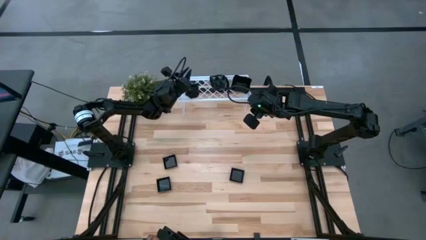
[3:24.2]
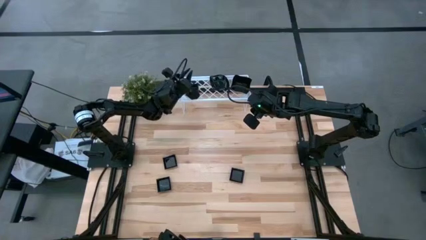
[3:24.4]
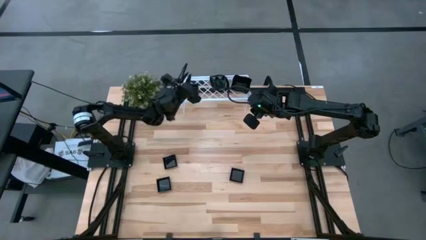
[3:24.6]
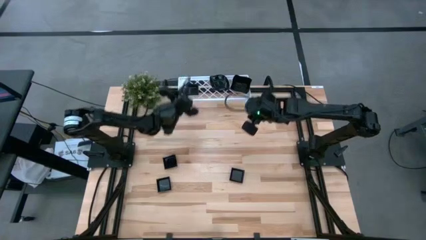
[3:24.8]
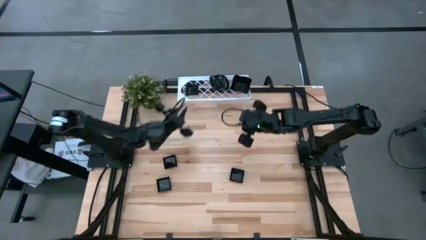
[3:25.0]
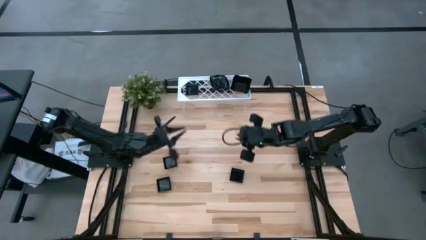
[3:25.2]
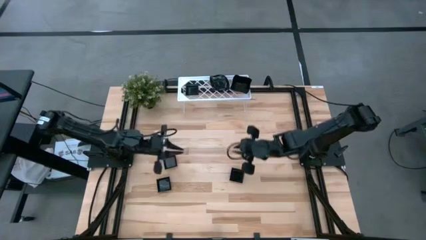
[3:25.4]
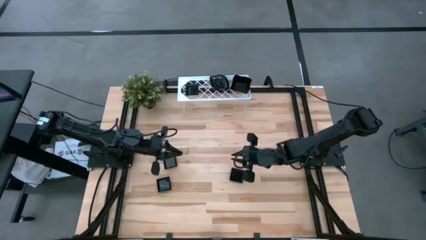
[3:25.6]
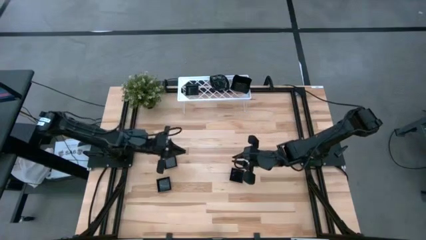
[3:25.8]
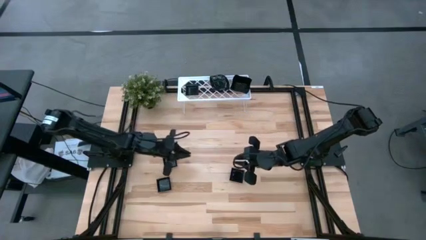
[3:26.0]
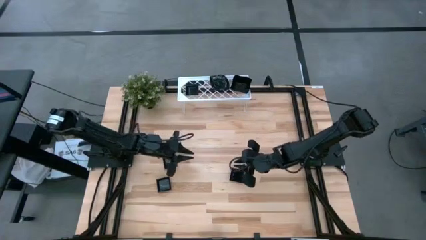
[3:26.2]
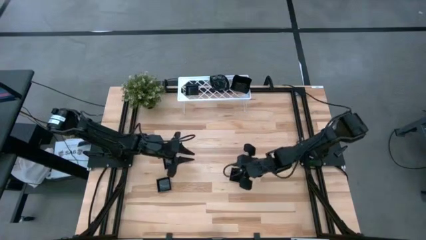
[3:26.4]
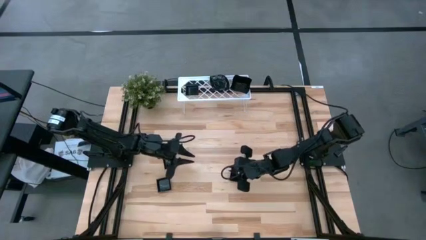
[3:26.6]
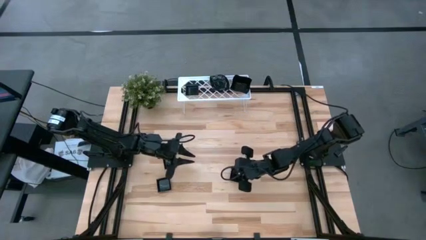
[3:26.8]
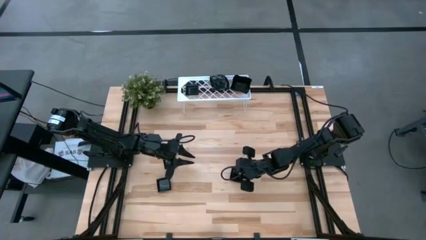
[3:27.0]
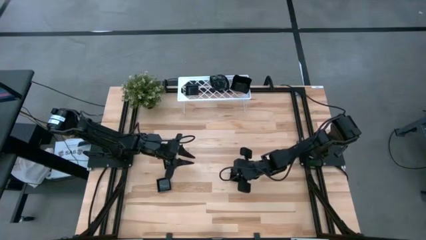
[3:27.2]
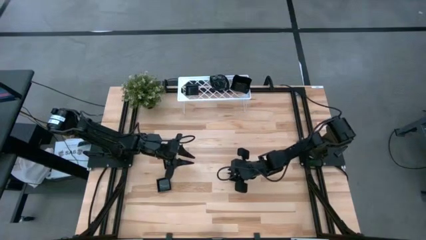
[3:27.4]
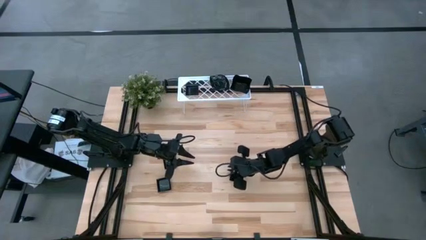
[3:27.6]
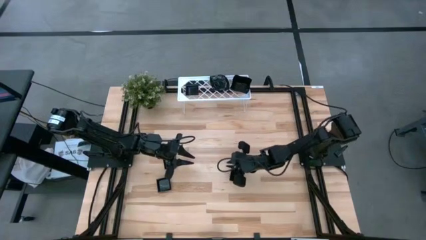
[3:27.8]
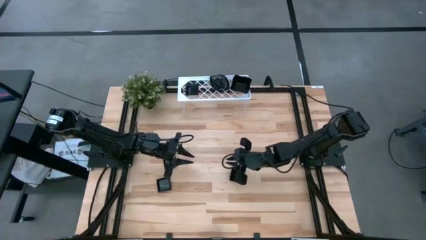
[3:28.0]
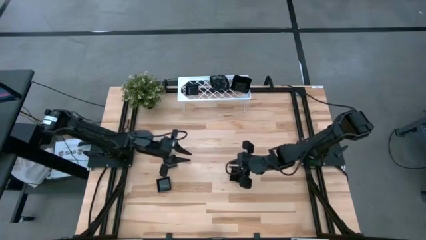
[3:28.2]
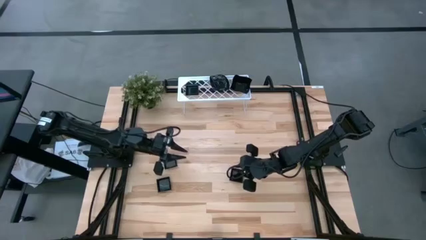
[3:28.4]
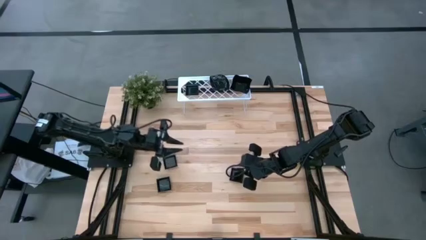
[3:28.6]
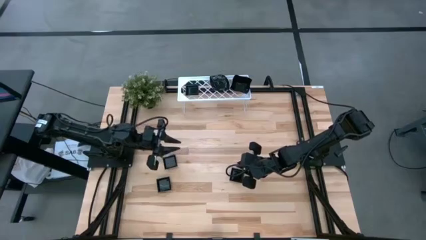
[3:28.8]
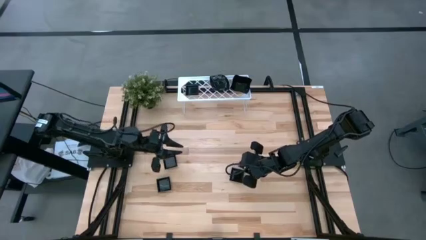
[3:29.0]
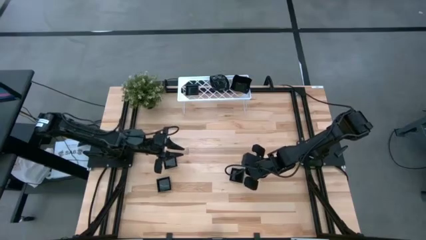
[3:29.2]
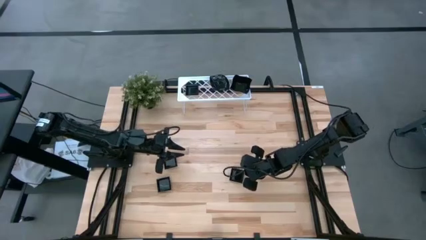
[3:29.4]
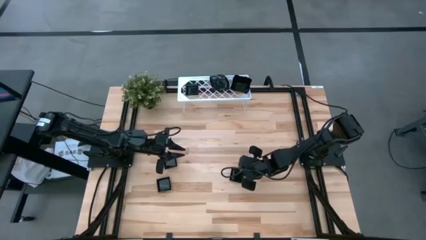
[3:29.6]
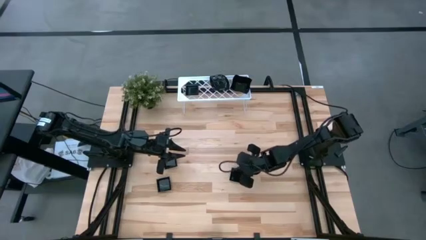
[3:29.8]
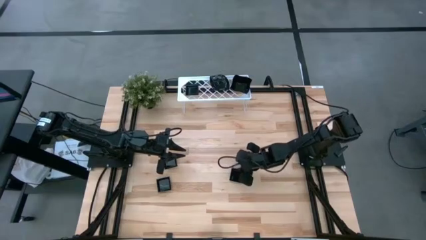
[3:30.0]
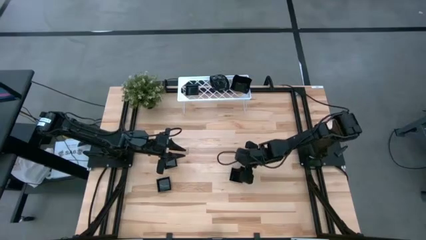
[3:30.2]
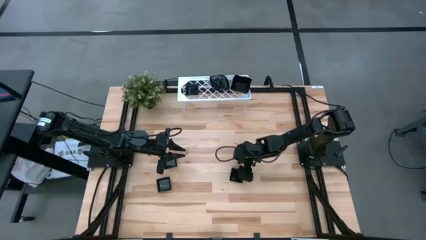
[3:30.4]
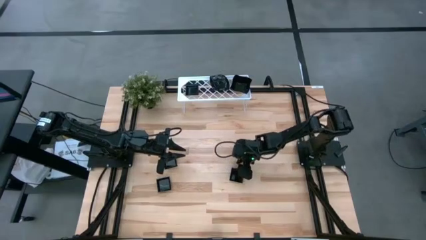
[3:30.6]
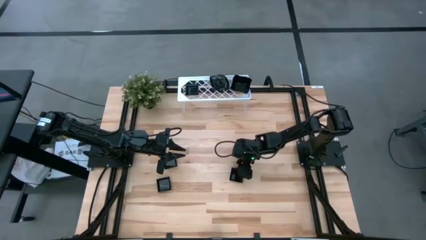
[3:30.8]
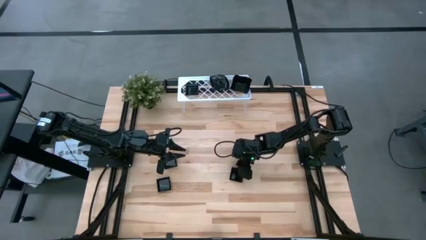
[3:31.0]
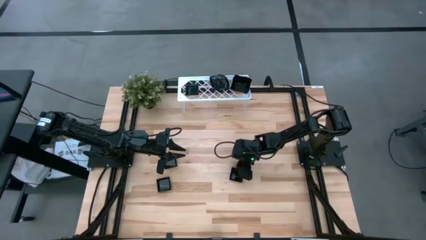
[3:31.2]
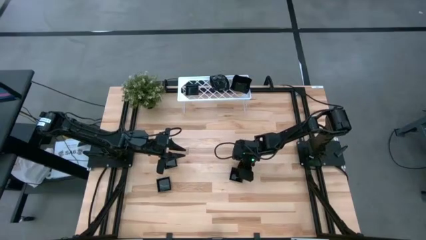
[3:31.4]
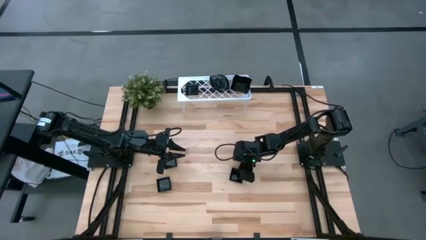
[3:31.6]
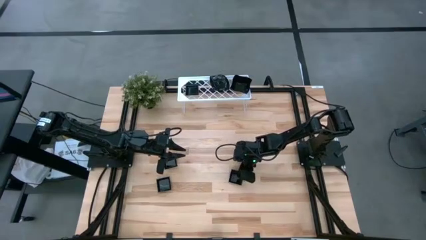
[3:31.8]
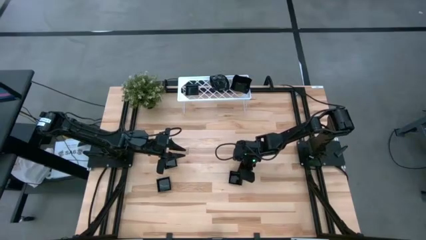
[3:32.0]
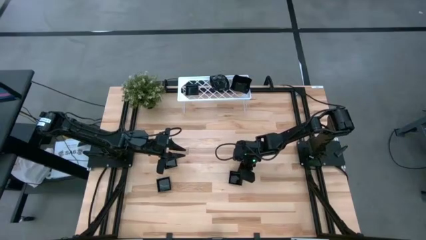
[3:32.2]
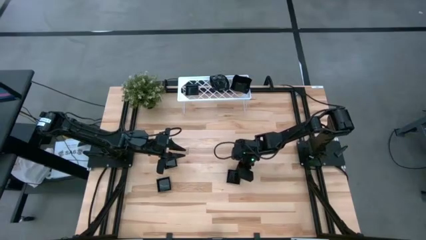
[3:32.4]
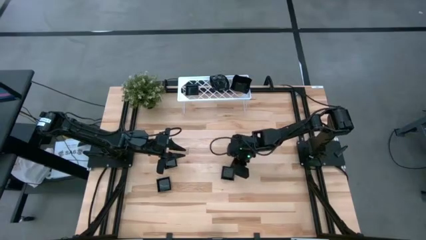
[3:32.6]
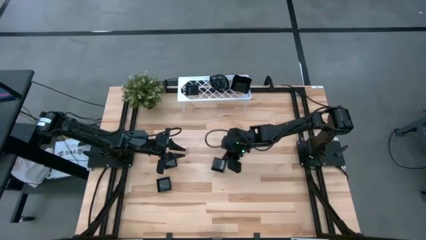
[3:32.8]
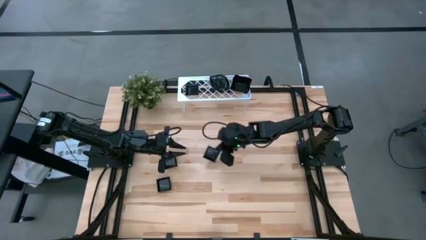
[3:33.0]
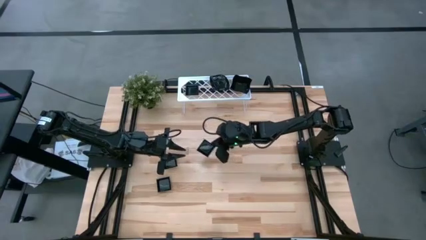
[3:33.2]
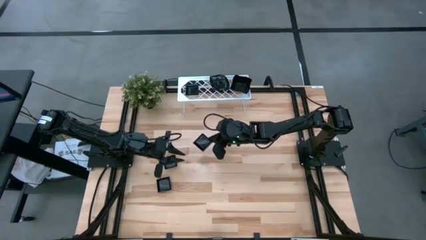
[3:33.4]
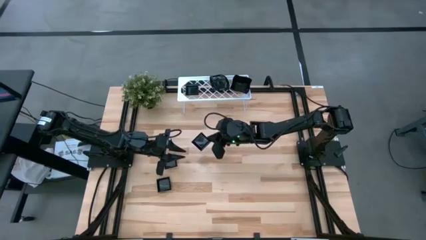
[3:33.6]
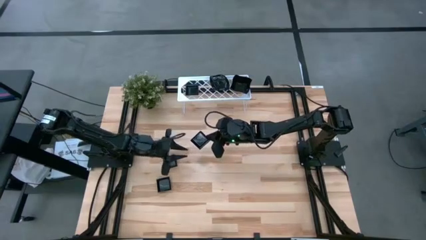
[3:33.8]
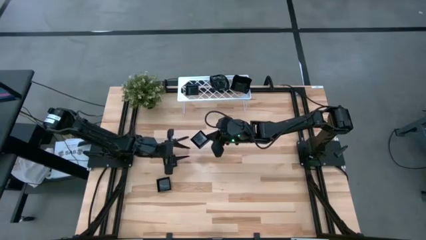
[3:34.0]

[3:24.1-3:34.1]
Task: Pick & Place Mini shaped plates
Stack the black square plate on top of the black square plate on the shelf

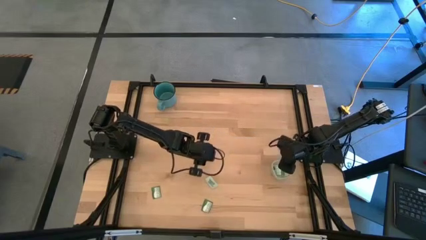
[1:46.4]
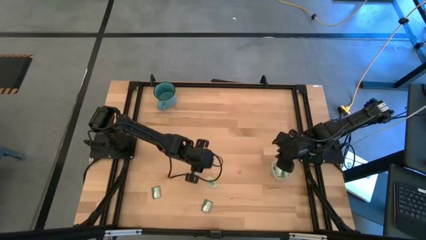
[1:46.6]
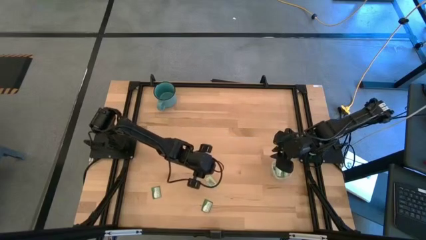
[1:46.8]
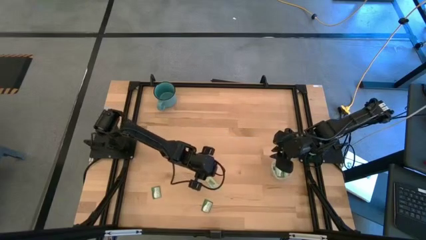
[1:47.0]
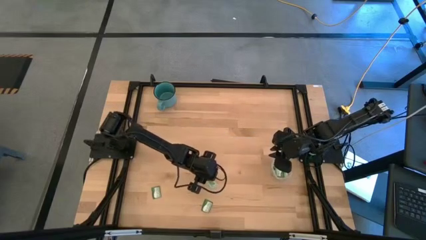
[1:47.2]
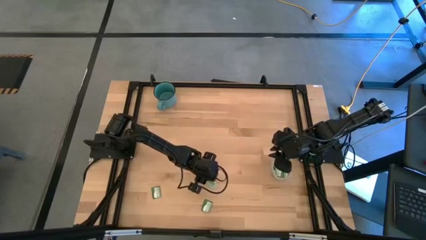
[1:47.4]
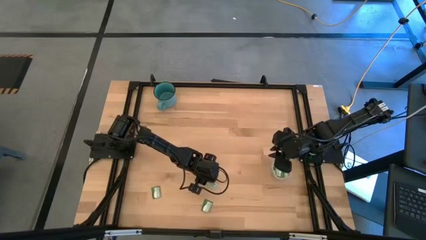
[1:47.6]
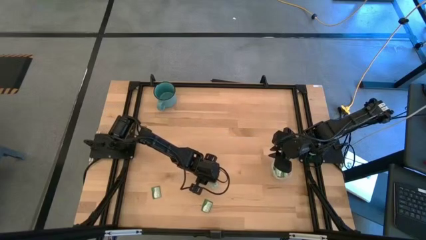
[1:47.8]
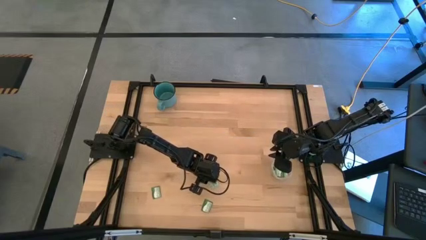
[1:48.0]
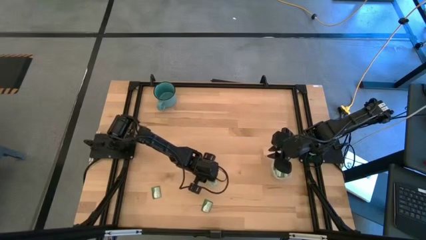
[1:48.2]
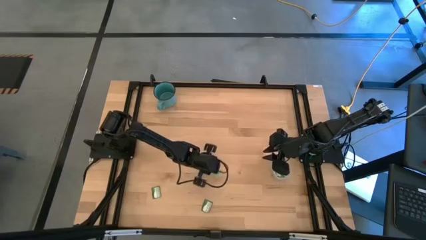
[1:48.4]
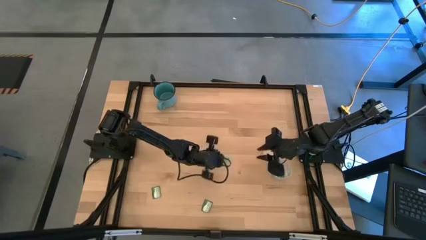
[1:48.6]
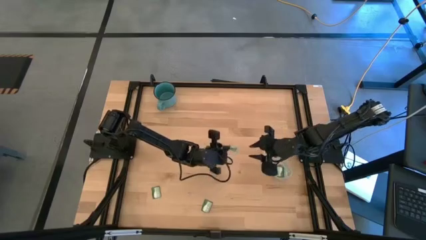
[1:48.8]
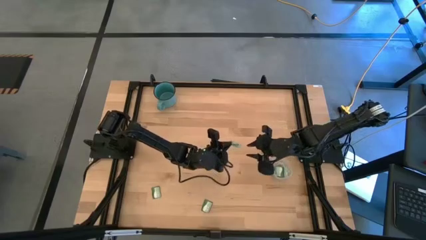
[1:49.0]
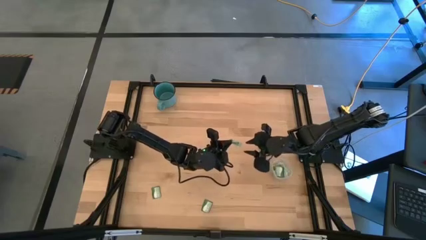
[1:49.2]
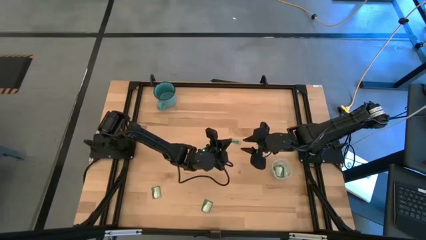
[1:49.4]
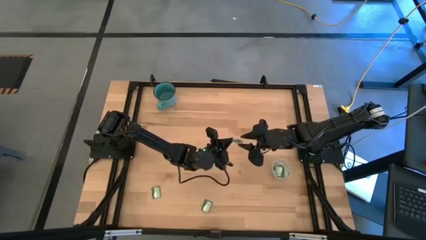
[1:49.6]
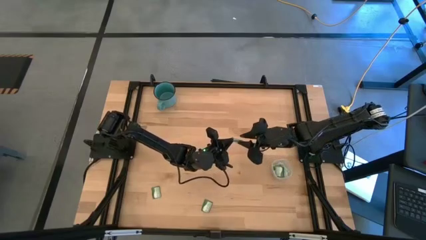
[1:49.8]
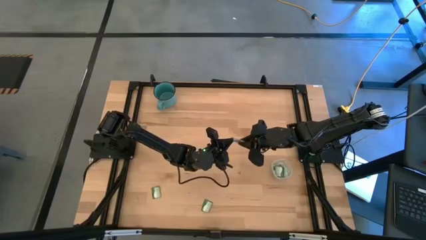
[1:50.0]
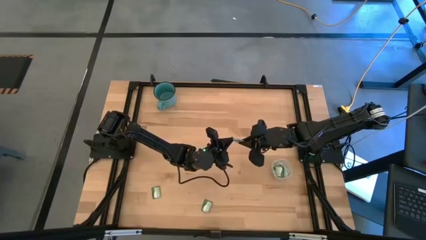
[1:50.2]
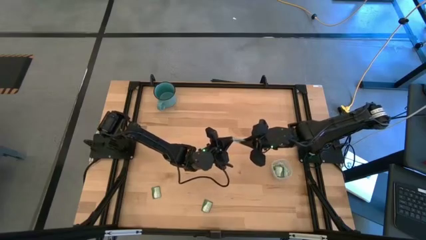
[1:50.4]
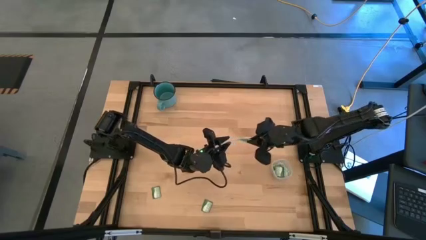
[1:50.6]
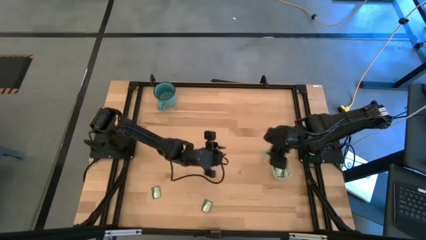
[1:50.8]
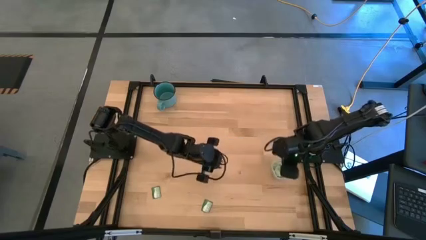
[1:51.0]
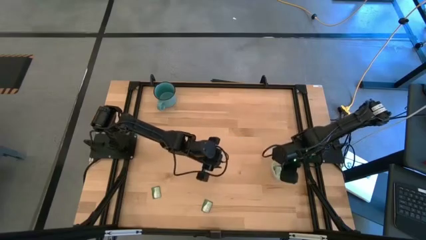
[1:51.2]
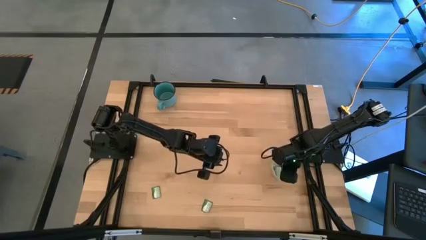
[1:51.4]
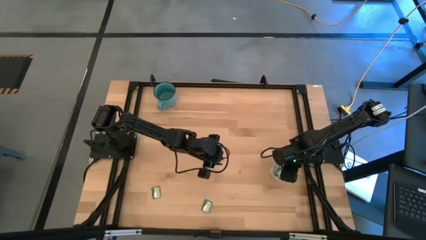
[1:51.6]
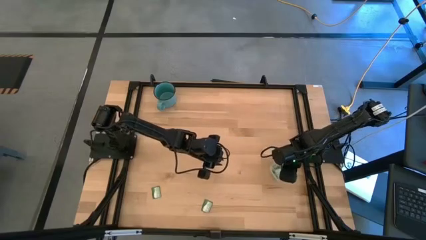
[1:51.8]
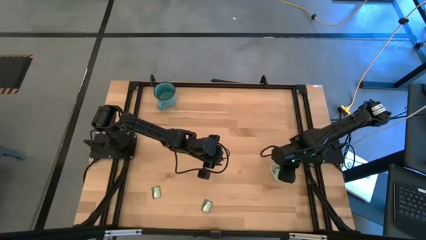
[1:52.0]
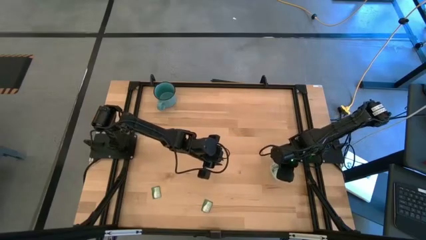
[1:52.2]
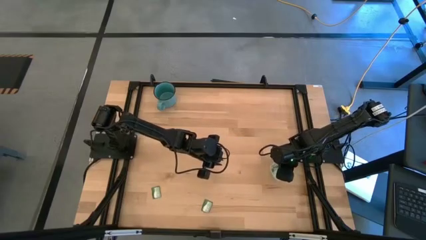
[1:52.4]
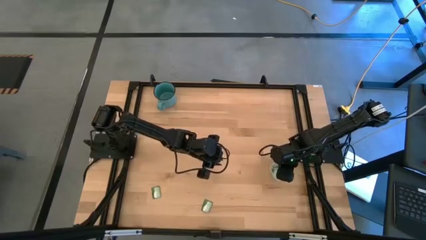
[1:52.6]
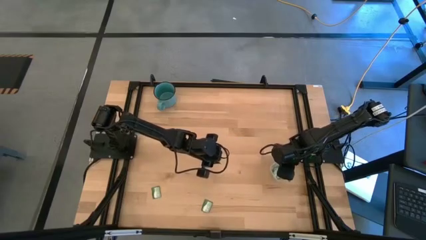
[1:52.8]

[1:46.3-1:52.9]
Task: Pick and place items into bin
Put the white stevia packet into the transparent bin
